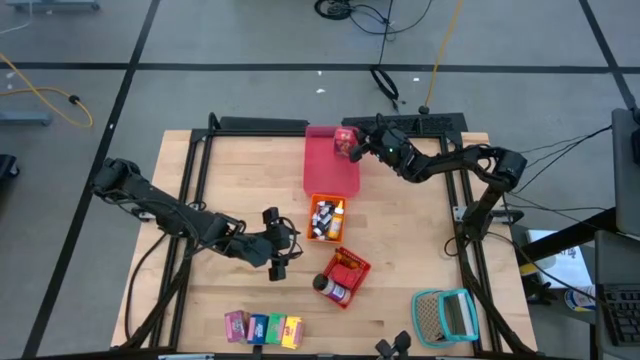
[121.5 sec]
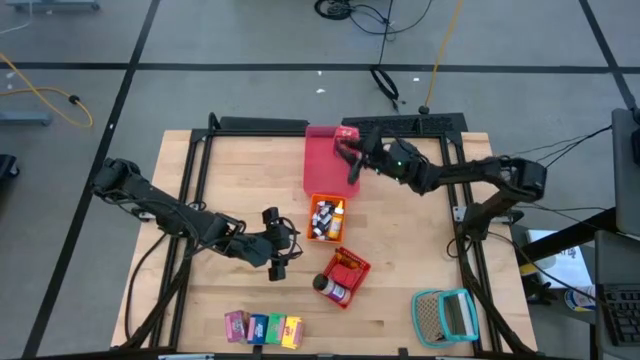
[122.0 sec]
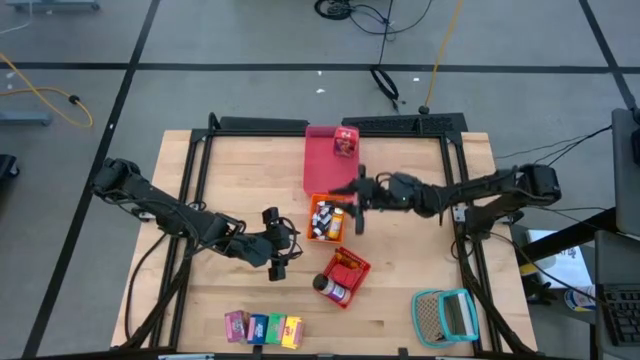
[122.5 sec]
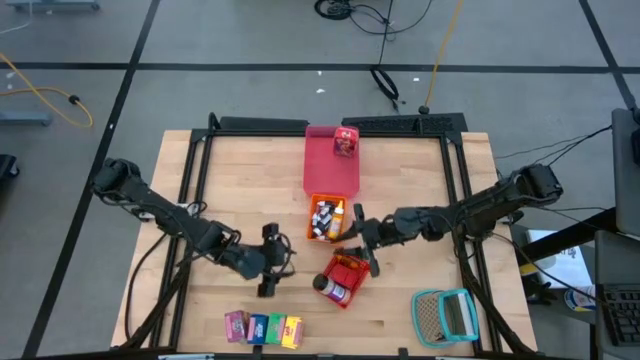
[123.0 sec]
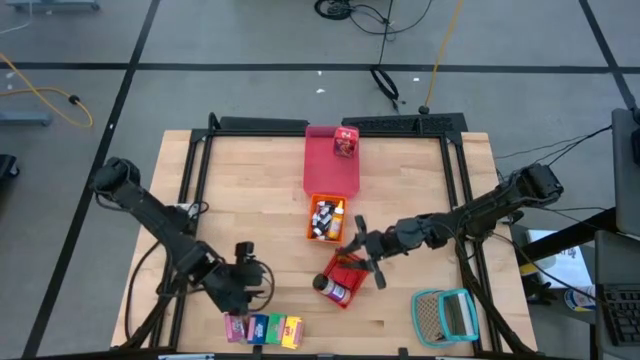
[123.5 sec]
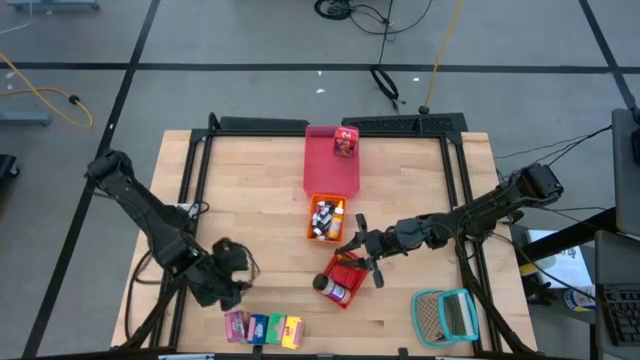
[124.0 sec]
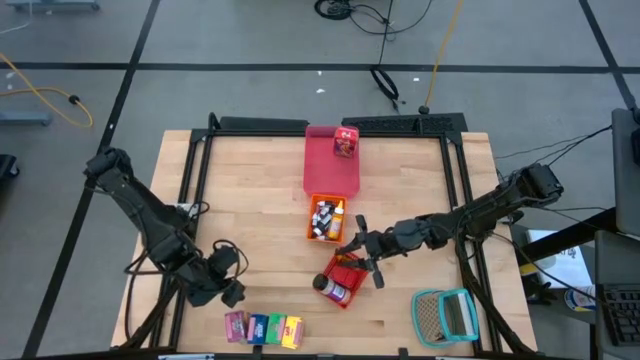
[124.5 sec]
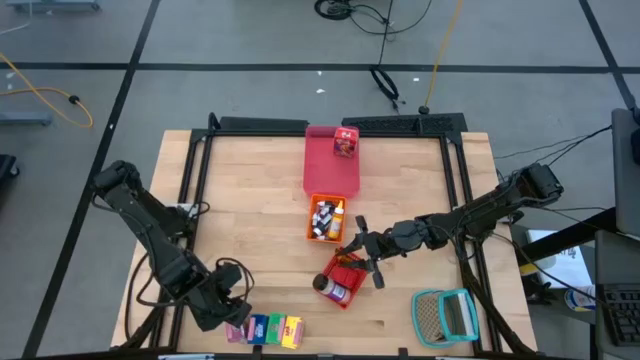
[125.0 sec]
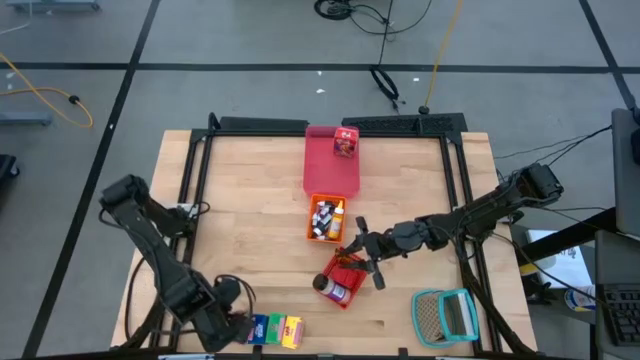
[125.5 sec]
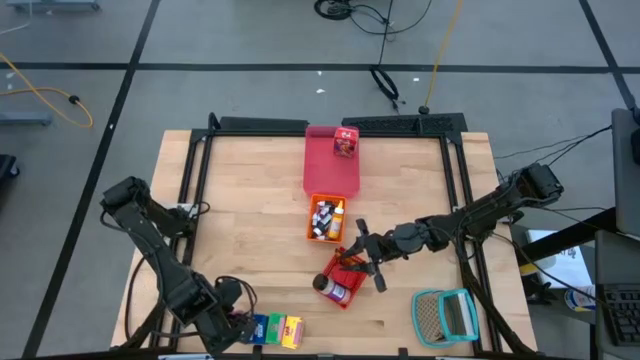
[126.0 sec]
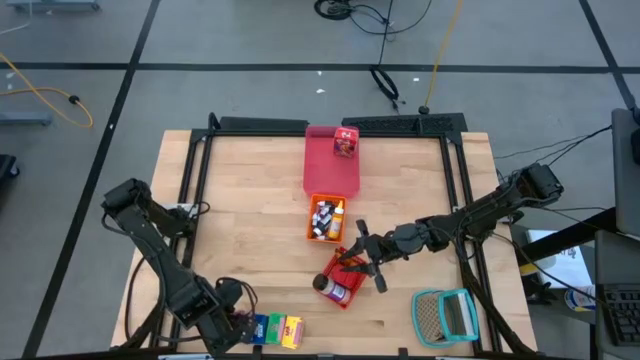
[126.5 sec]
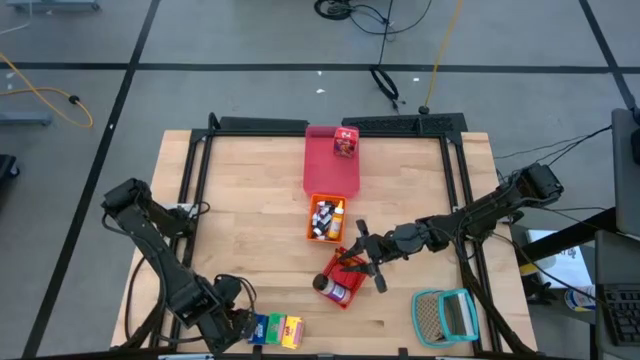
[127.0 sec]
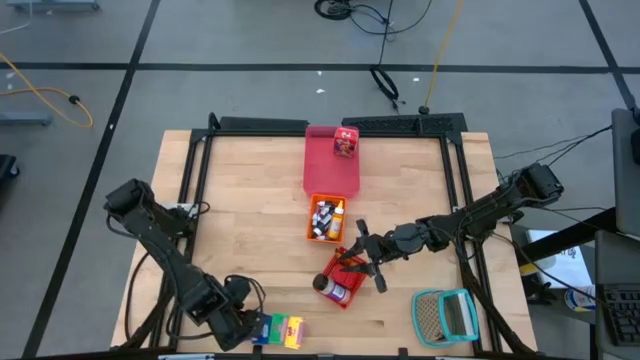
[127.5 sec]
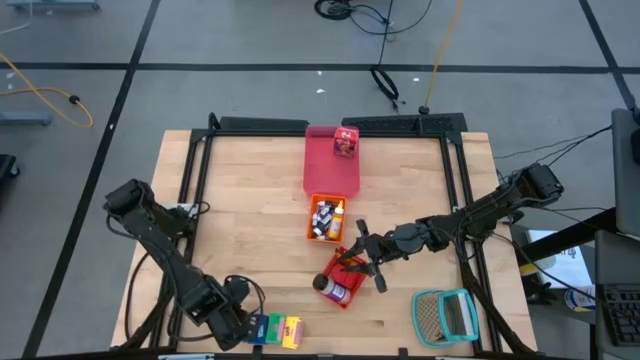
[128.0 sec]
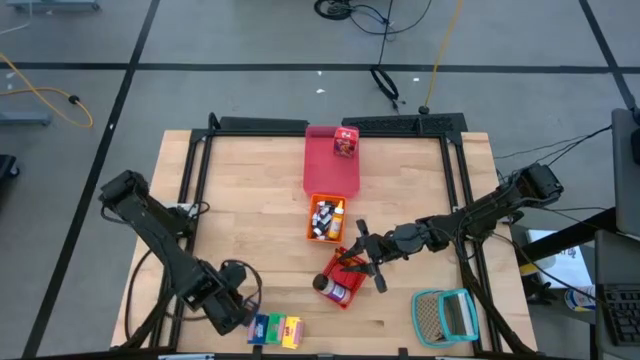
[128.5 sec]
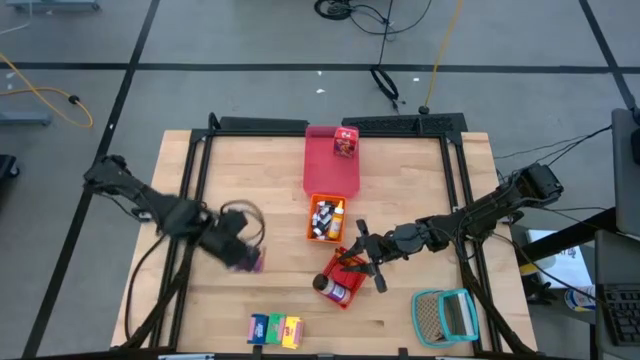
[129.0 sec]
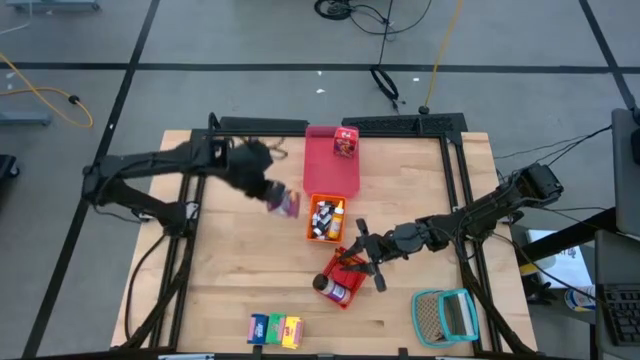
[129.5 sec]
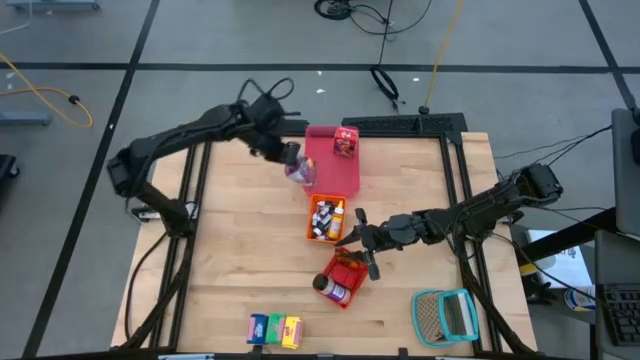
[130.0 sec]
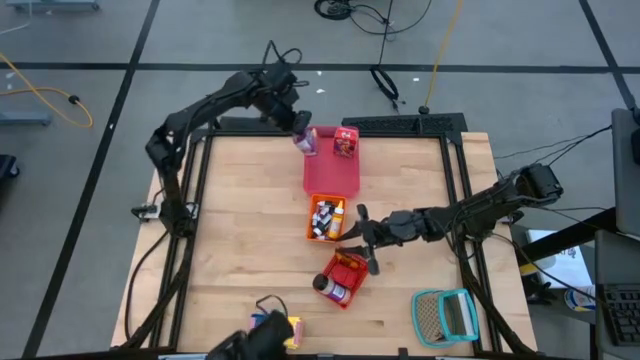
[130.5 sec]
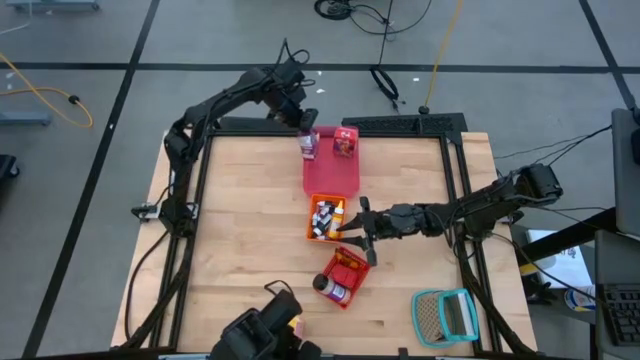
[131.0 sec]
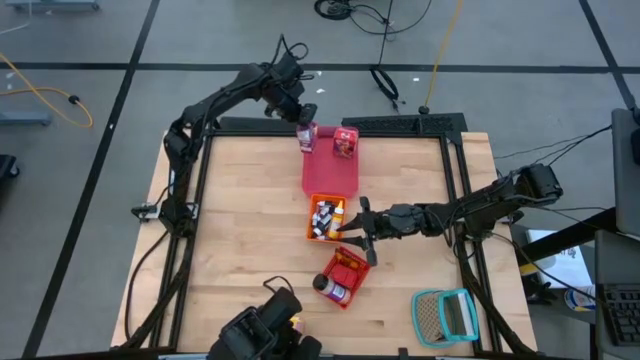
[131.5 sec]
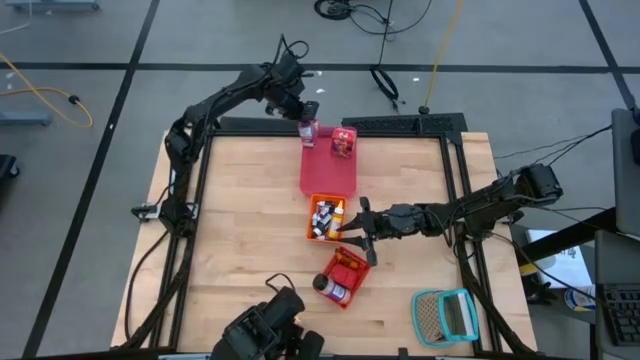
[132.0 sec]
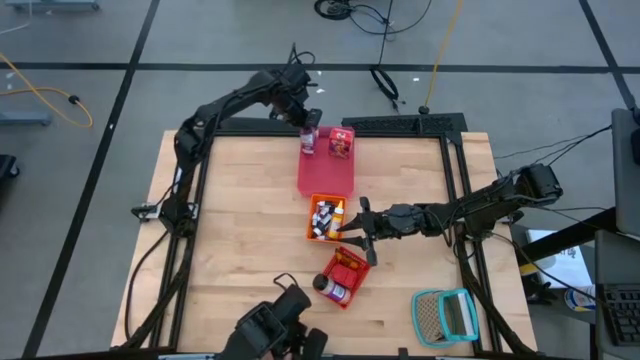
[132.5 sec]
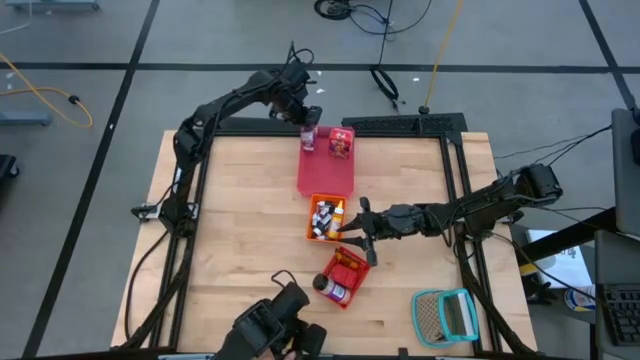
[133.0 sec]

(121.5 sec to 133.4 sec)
Task: Pick & Place Kitchen Items
Put the purple cereal box into the red bin

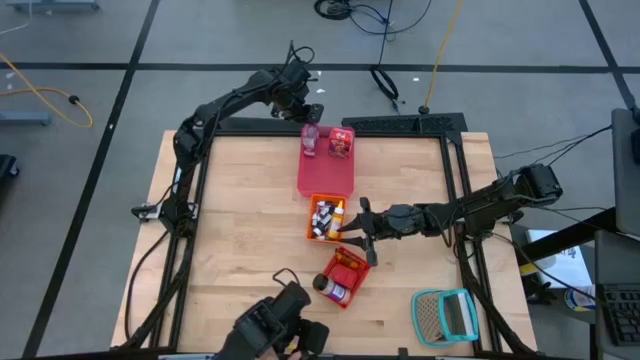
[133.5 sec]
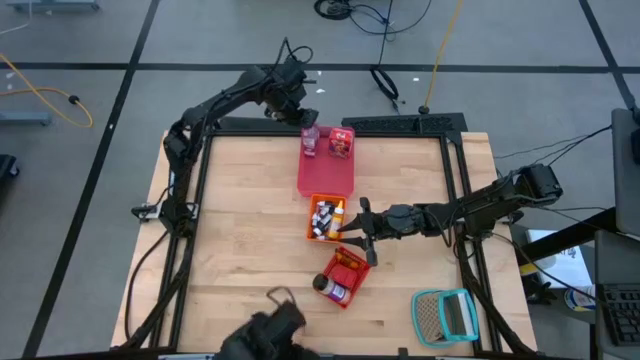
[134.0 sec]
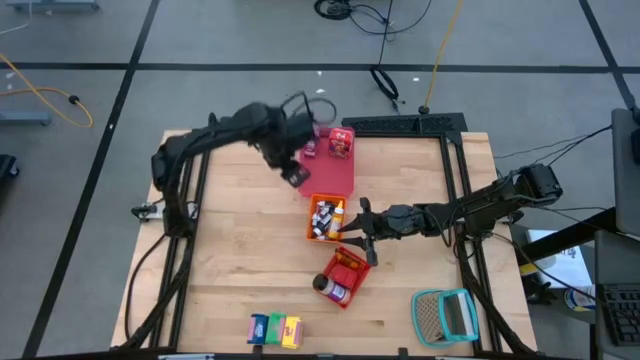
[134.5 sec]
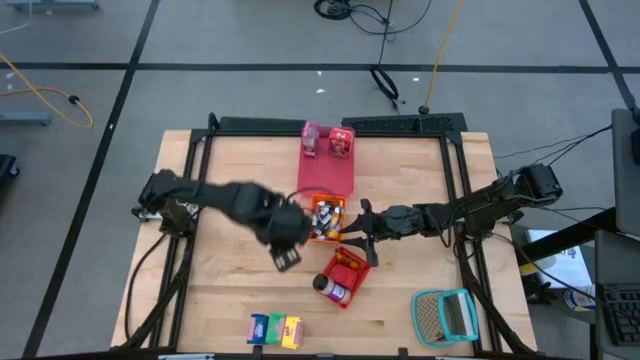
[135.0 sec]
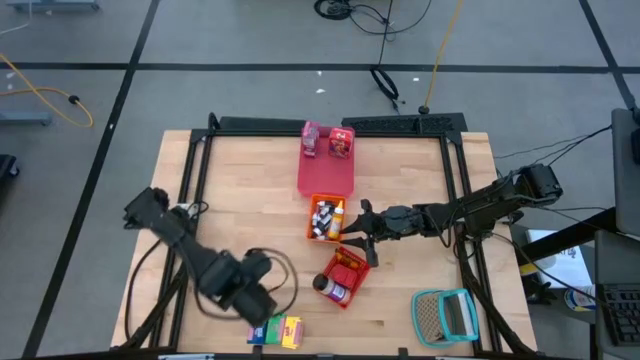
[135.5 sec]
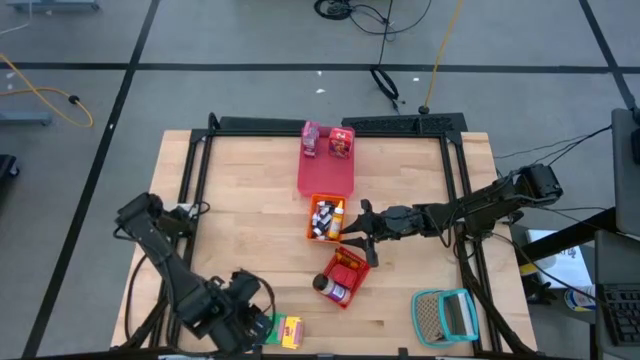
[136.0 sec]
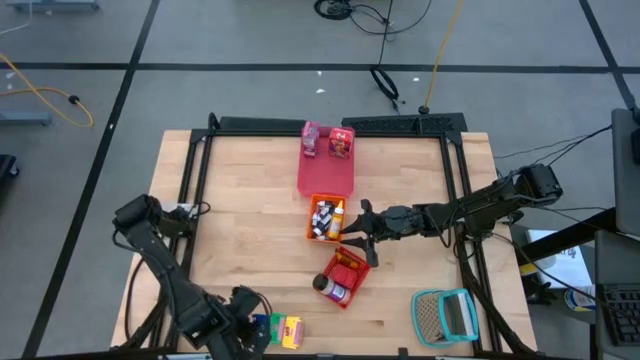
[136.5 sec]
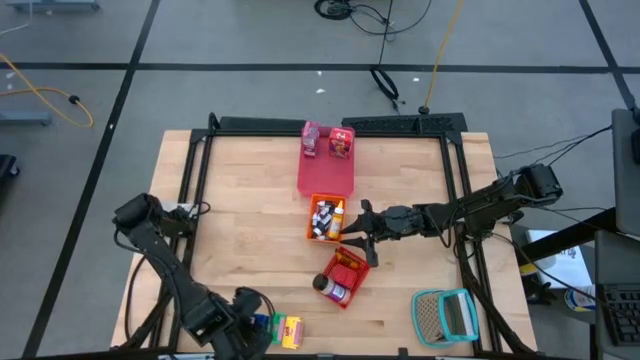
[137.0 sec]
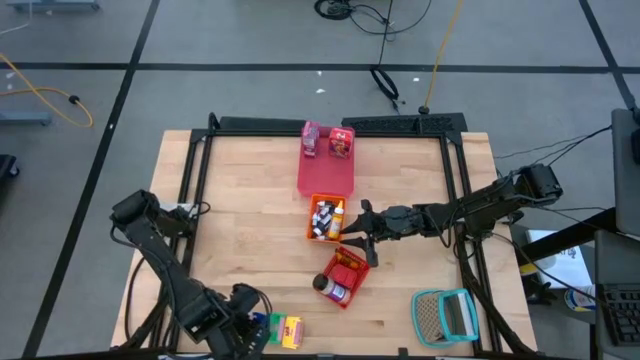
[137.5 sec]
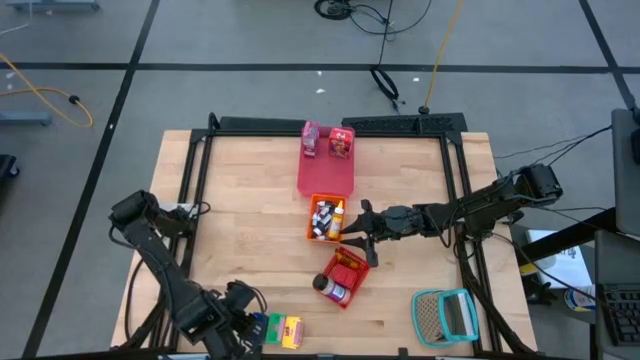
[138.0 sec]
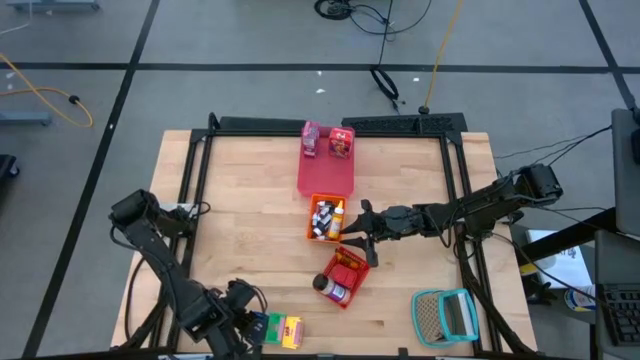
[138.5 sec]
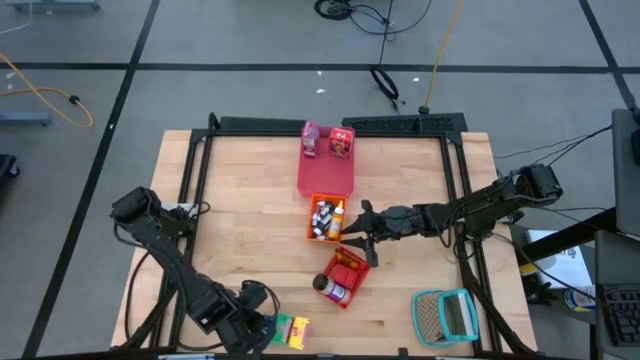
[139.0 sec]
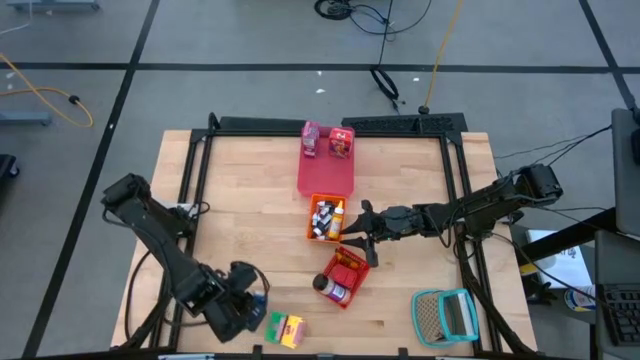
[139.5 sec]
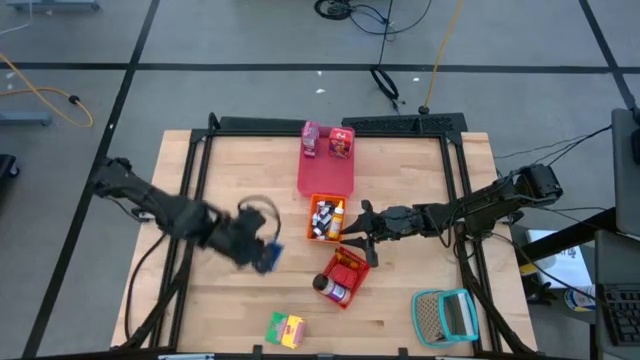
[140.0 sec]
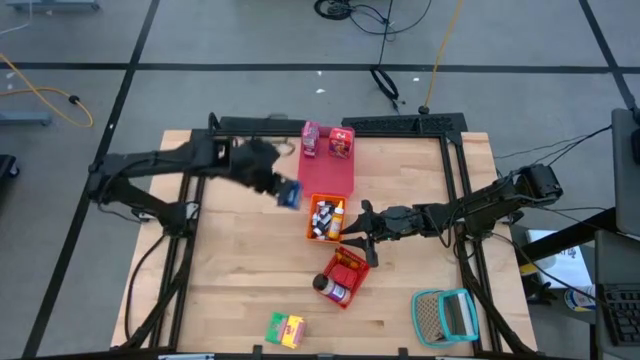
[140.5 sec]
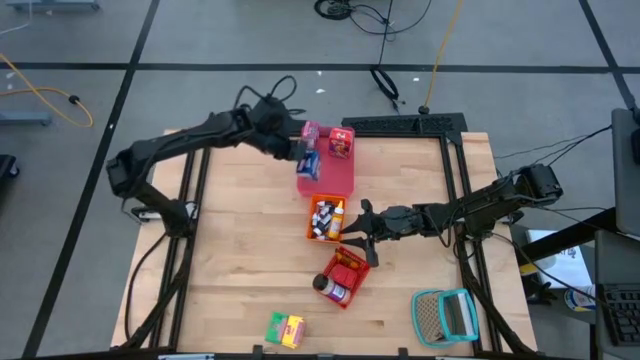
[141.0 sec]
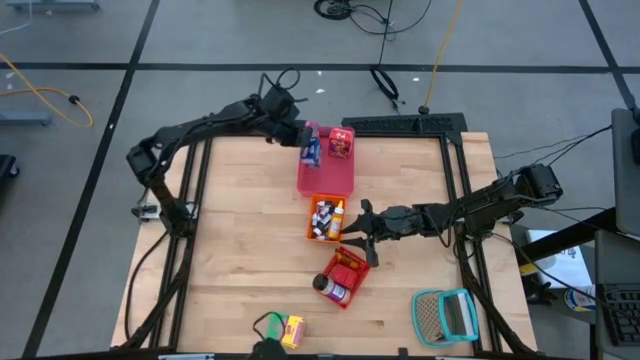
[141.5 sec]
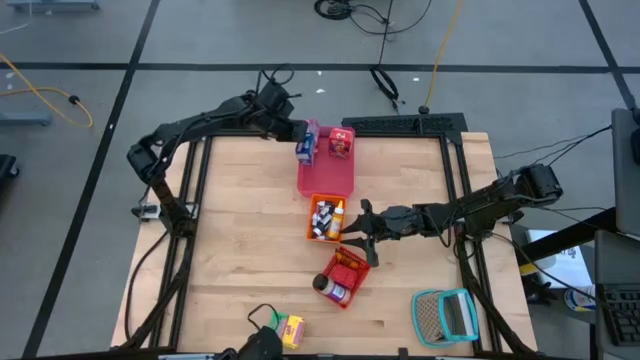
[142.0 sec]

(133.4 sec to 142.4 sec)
Put the blue cereal box into the red bin

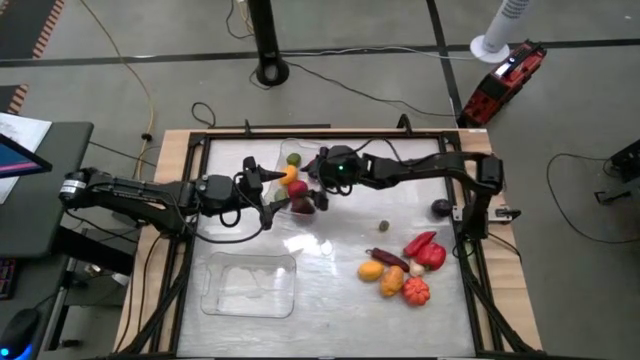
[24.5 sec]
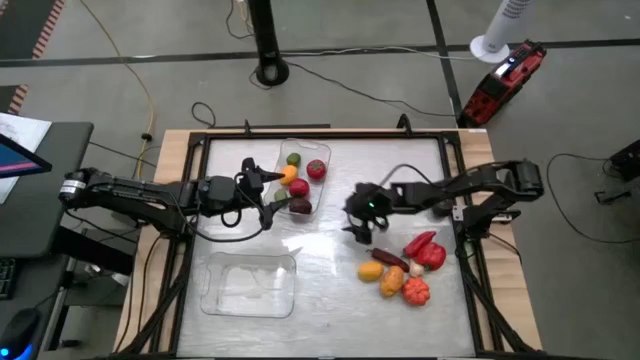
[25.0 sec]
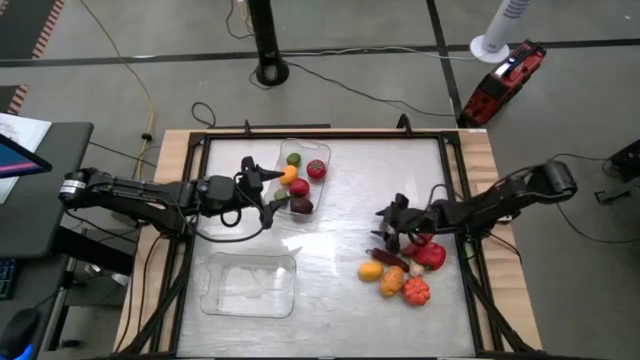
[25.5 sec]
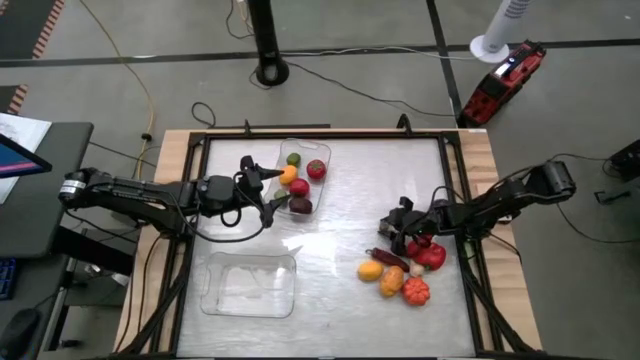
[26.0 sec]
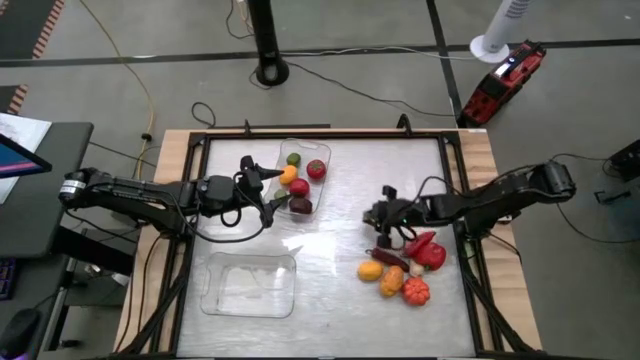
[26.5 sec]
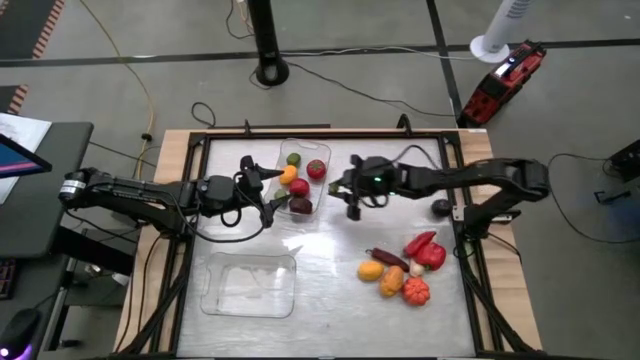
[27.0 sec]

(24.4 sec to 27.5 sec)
Task: Sort produce into baskets
Put the strawberry into the top transparent bin
